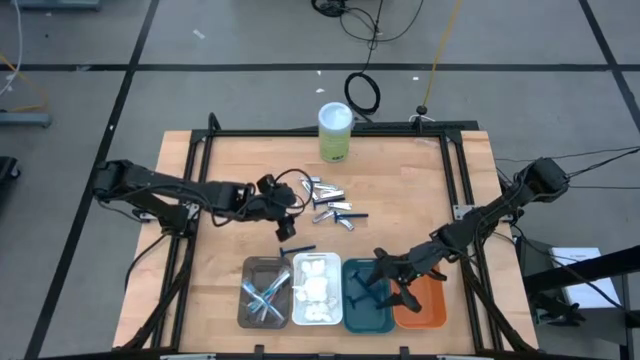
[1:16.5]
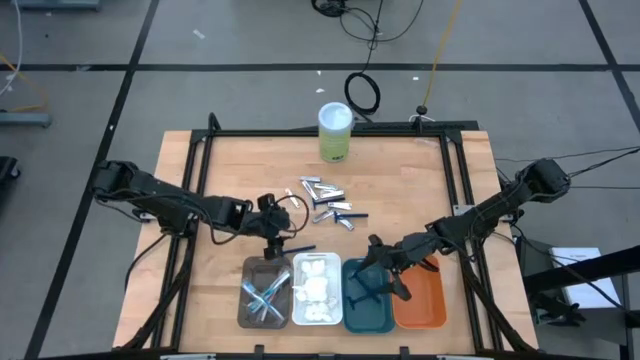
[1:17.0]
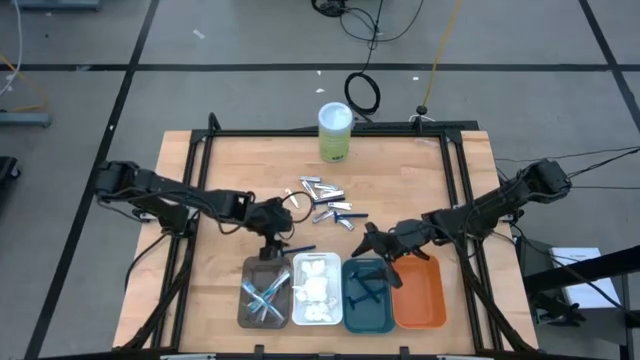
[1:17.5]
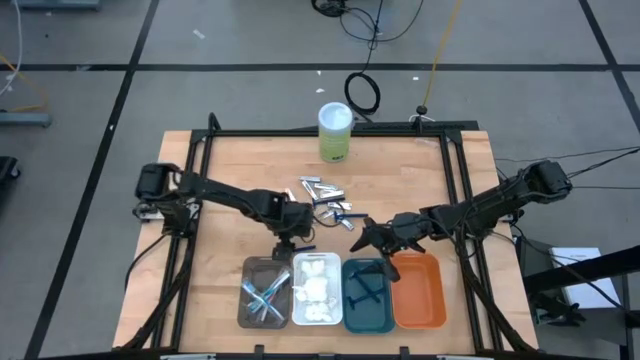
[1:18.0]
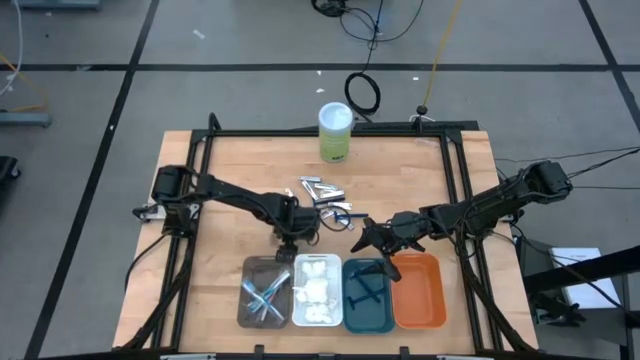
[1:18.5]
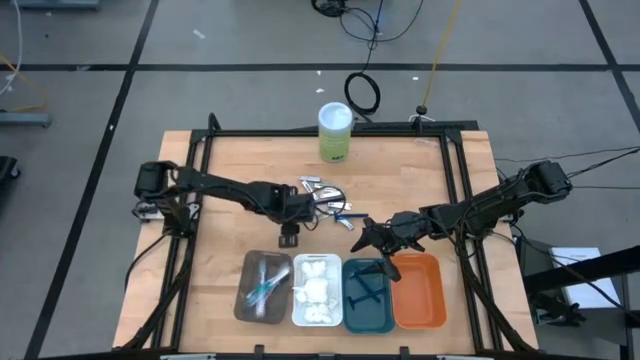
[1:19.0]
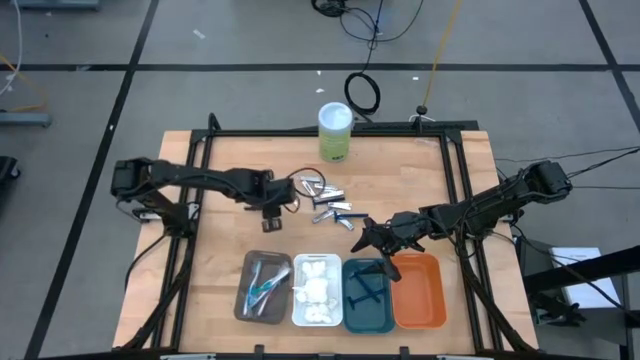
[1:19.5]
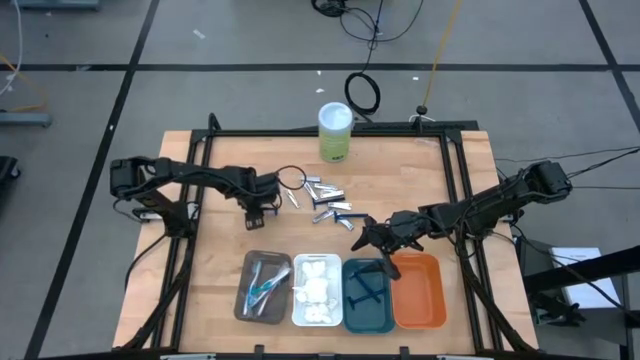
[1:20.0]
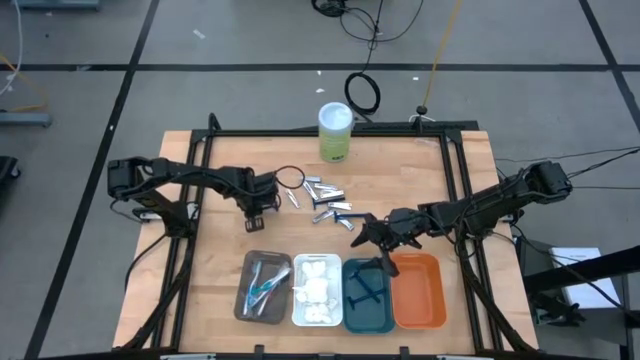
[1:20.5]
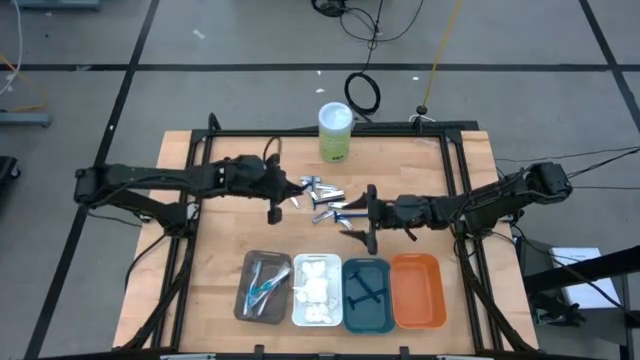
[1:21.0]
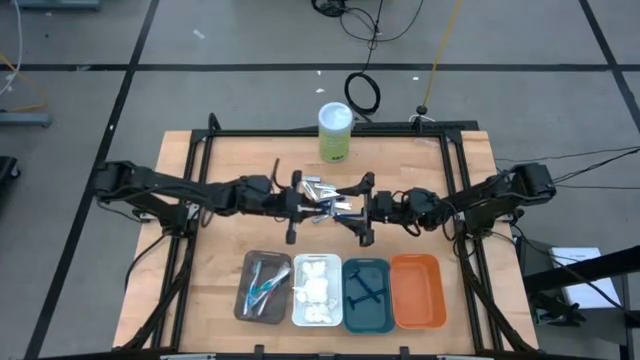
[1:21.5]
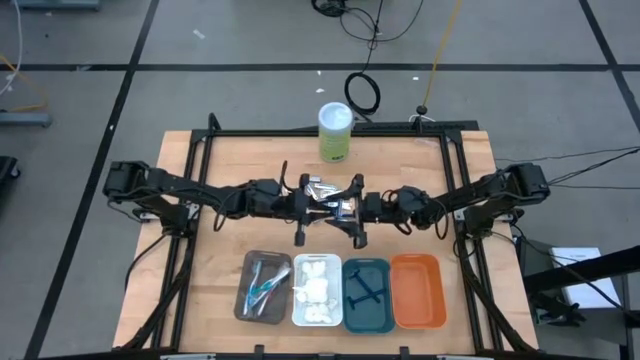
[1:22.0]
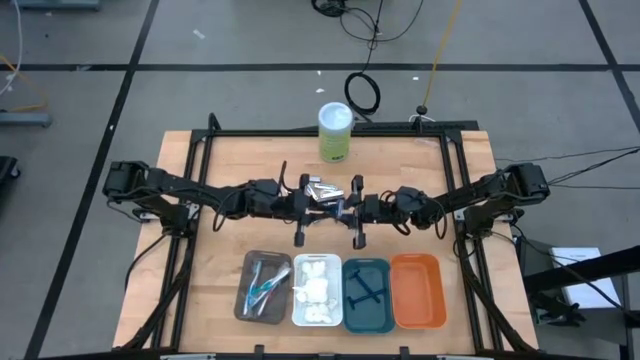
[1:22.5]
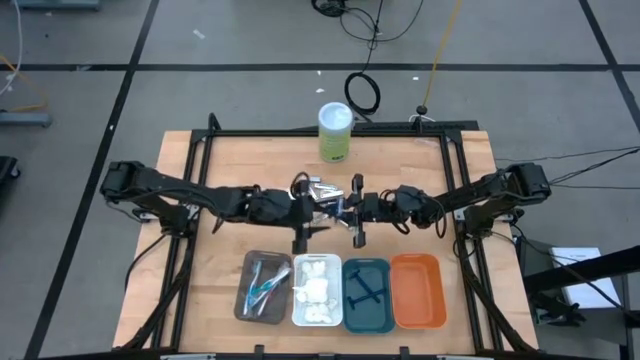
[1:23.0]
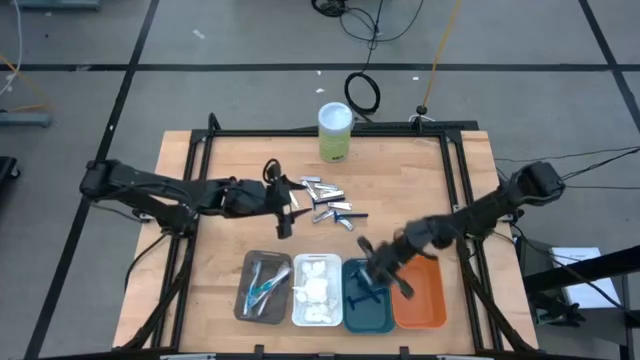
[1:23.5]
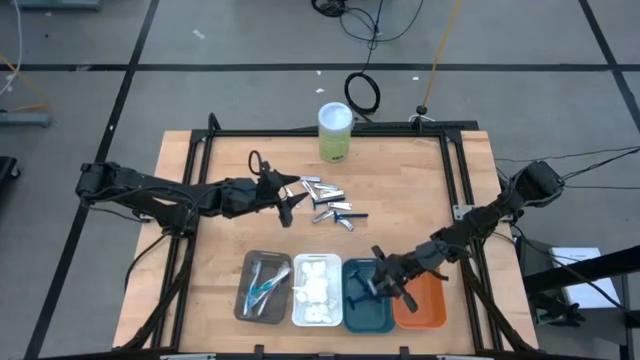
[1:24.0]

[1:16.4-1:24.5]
Task: Pick & Place Travel size toiletries
Put the blue razor into the blue bin

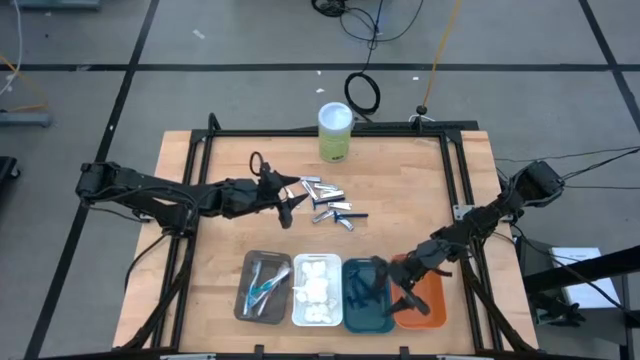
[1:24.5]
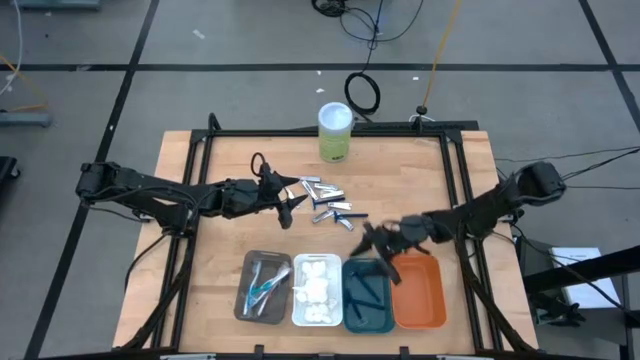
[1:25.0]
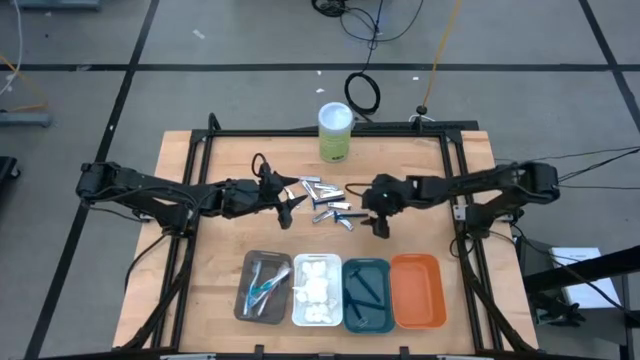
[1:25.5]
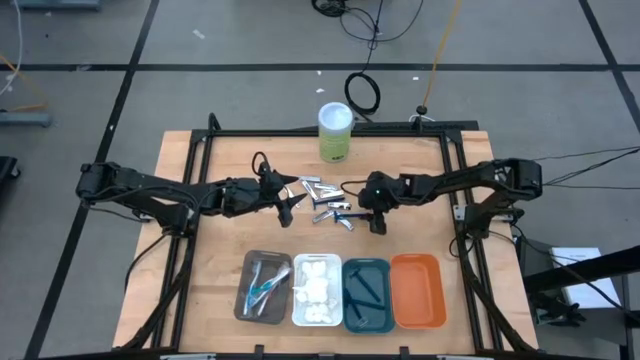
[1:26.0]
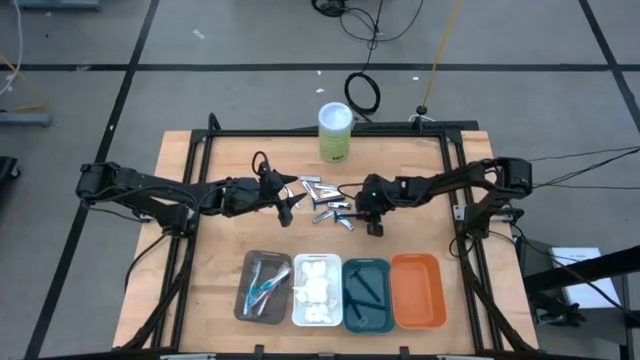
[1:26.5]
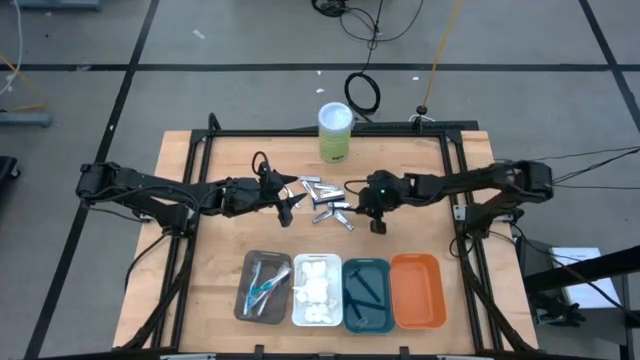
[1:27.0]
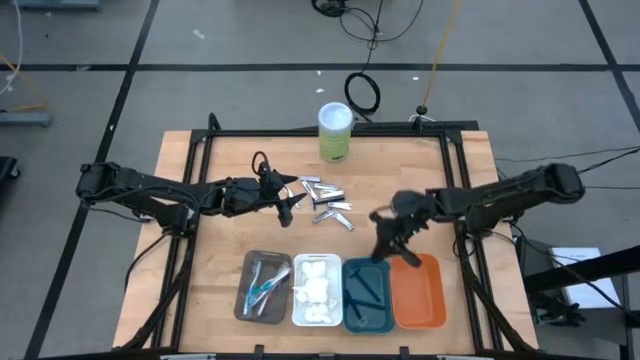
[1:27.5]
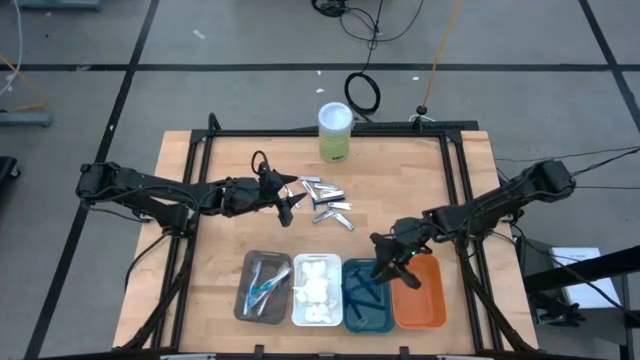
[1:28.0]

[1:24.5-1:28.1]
Put the blue razor into the blue bin

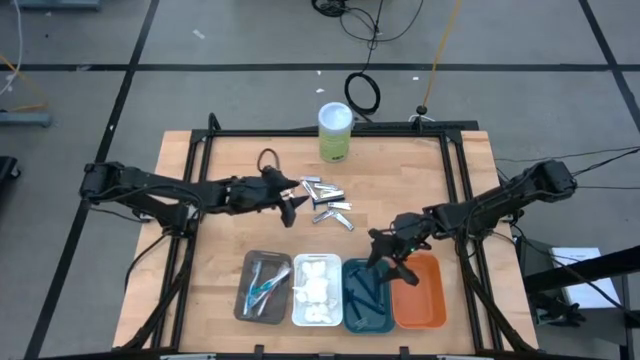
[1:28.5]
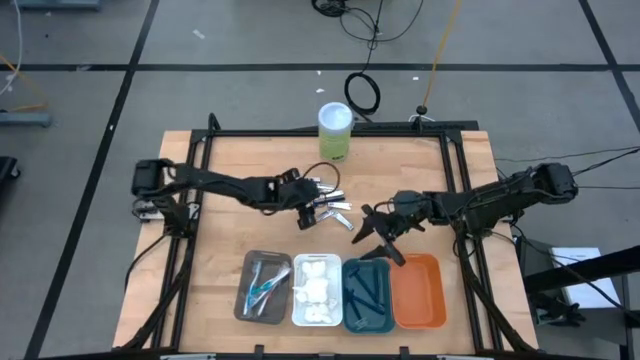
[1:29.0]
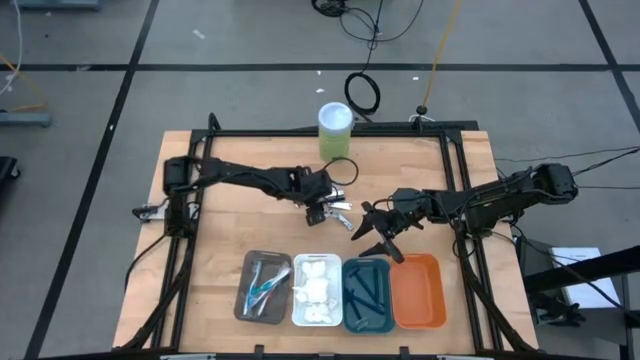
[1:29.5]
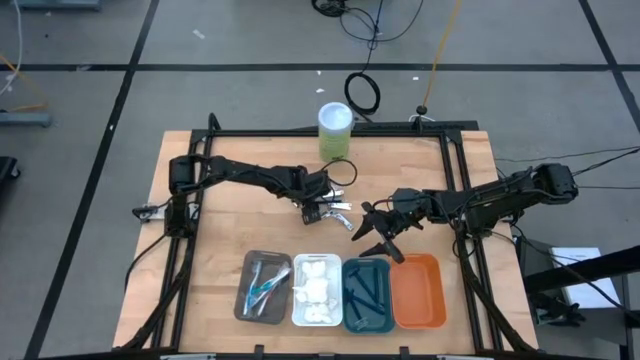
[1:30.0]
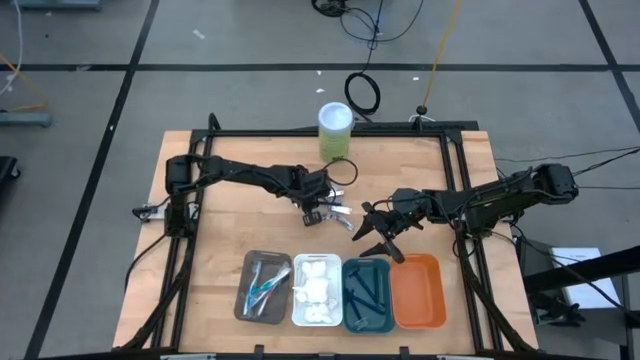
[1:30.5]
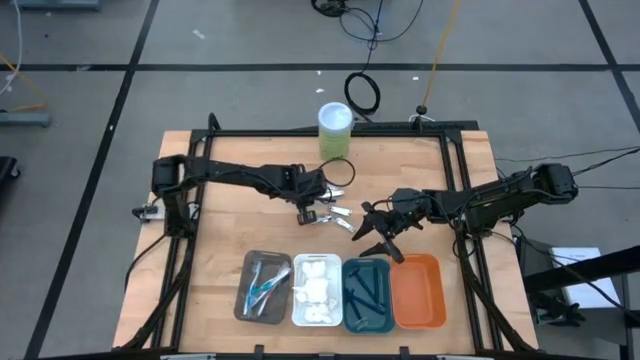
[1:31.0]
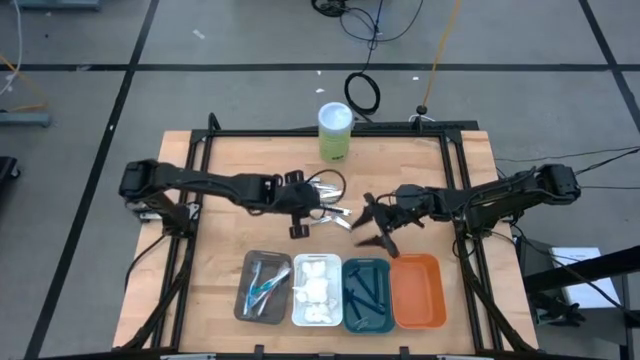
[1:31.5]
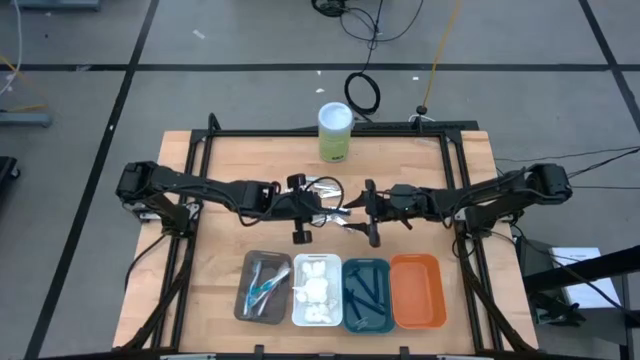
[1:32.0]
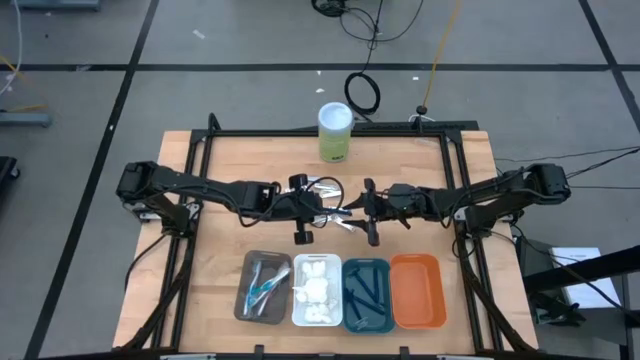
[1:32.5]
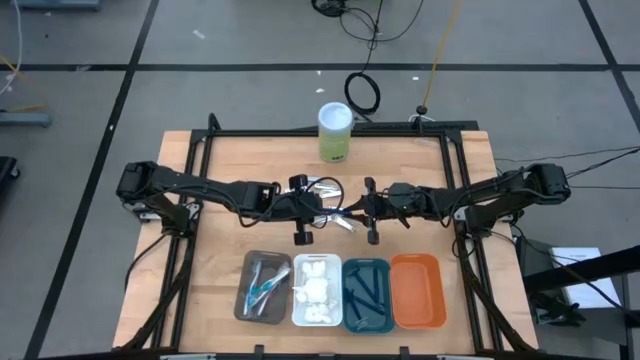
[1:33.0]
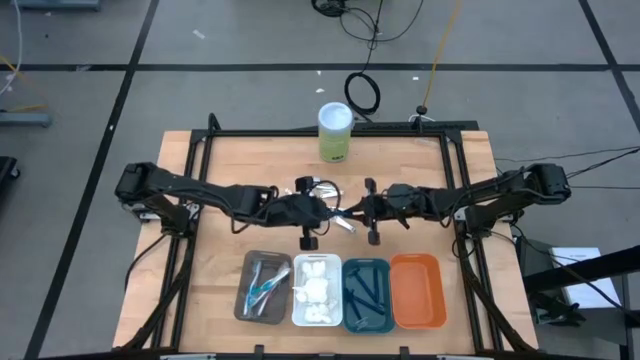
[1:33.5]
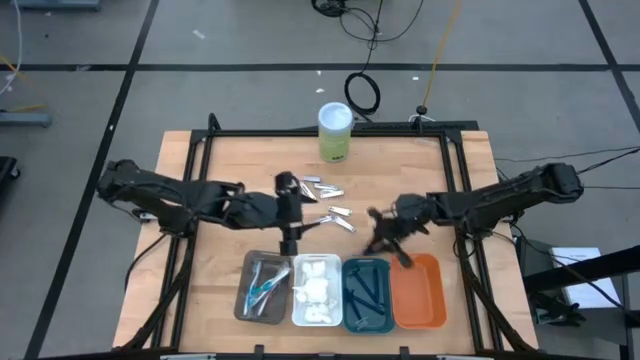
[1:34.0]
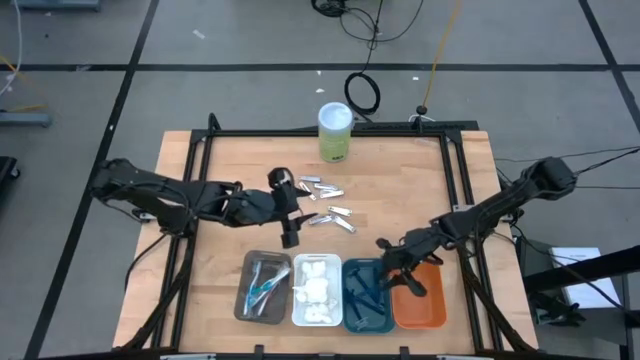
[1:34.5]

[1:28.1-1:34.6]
Put the blue razor into the blue bin

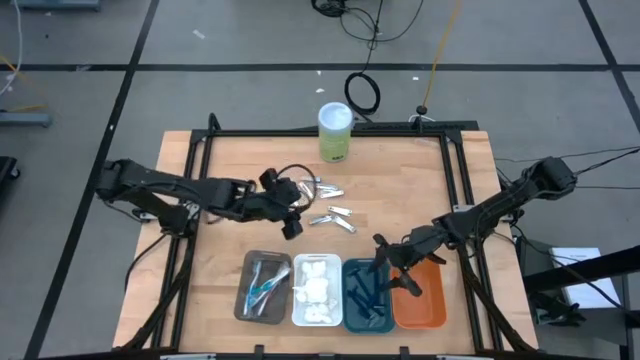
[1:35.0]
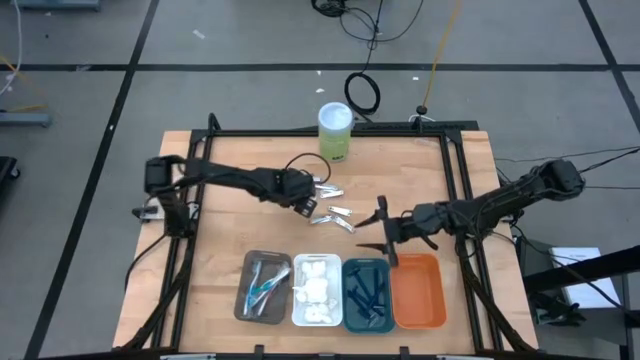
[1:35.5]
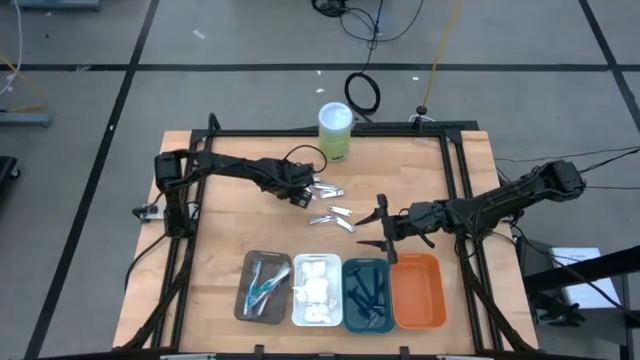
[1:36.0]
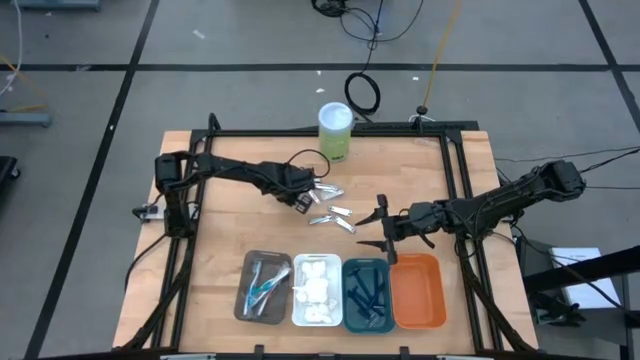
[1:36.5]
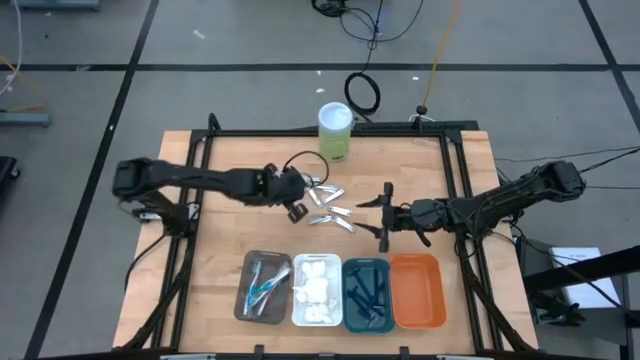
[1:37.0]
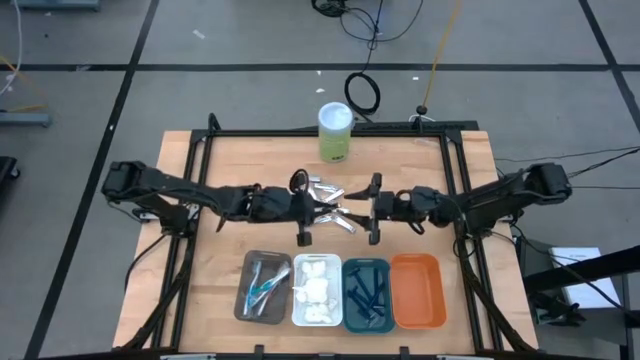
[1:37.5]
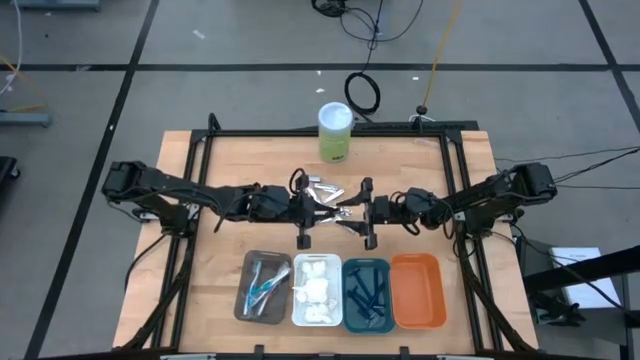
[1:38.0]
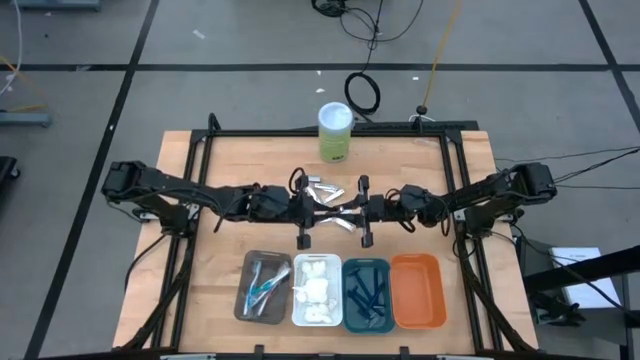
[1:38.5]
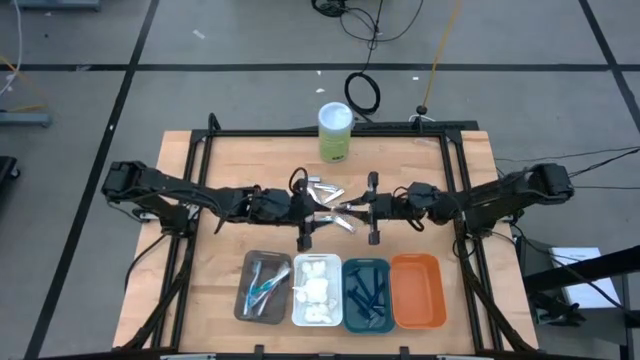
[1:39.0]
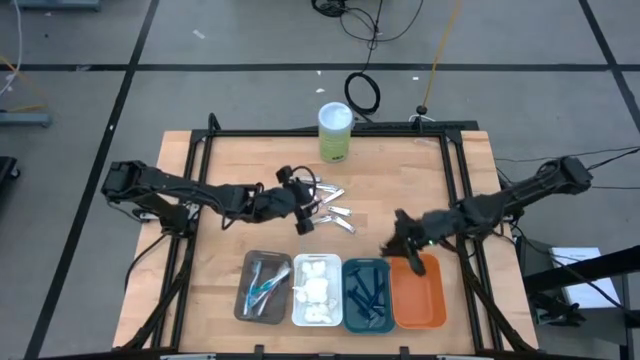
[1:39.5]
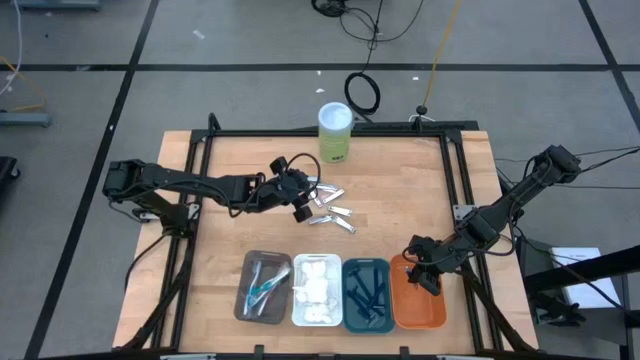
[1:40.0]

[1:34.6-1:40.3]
Put the silver nail cutter into the orange bin
